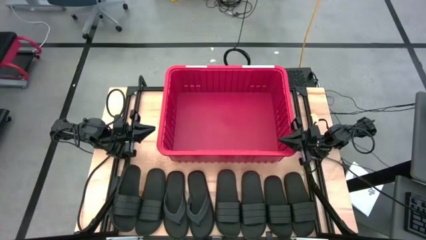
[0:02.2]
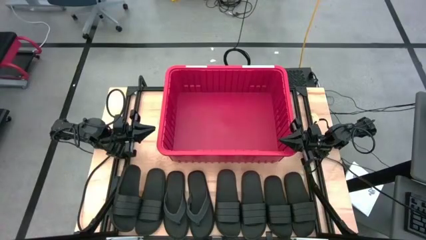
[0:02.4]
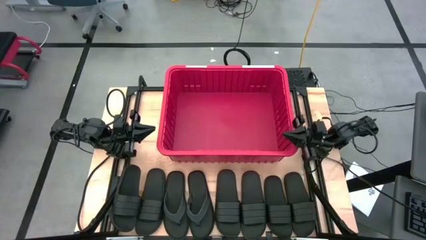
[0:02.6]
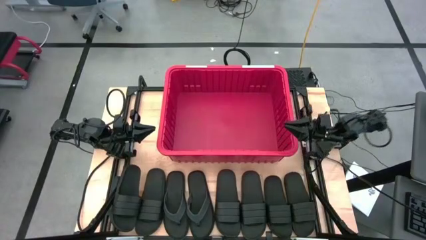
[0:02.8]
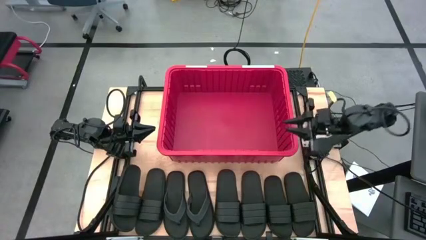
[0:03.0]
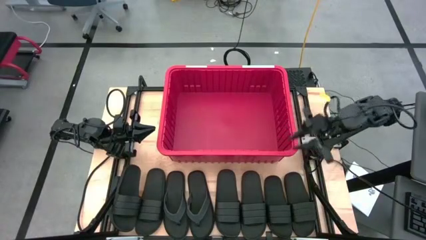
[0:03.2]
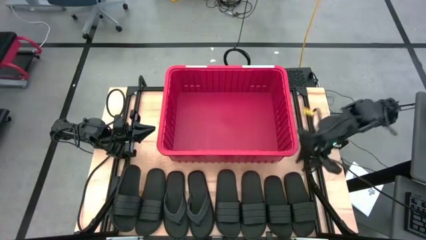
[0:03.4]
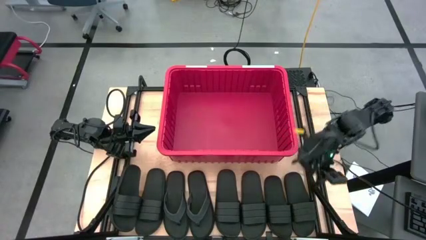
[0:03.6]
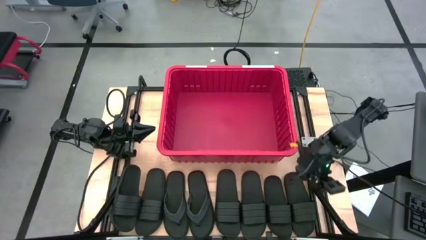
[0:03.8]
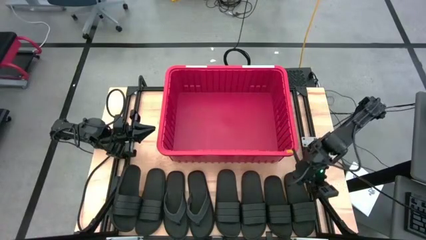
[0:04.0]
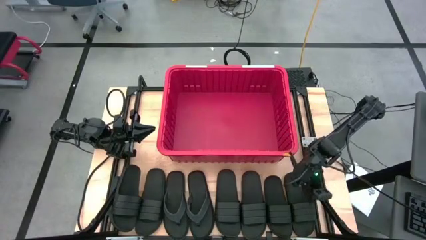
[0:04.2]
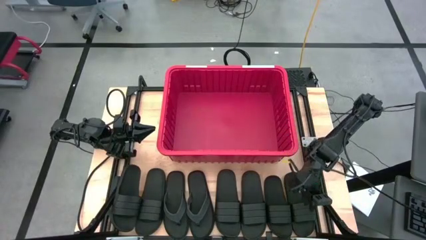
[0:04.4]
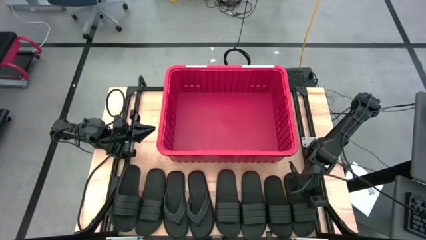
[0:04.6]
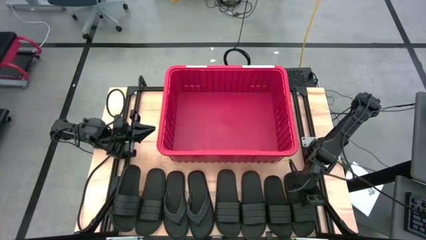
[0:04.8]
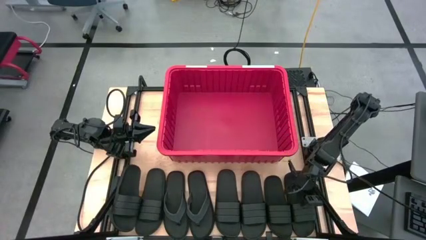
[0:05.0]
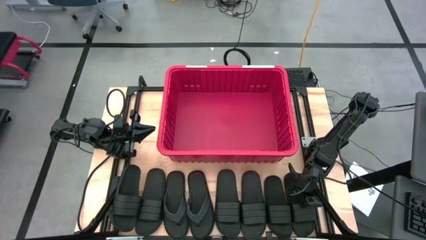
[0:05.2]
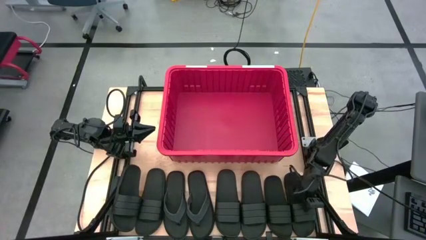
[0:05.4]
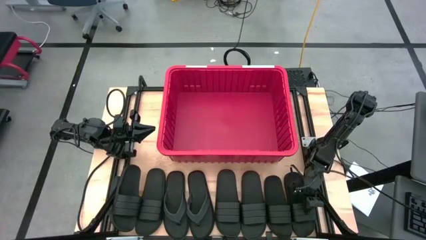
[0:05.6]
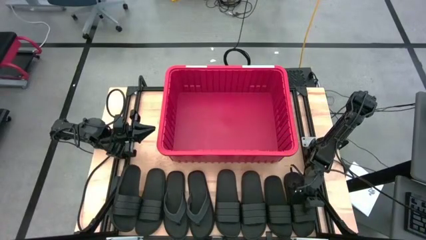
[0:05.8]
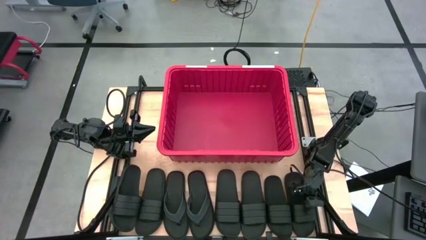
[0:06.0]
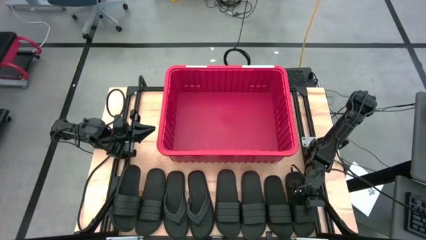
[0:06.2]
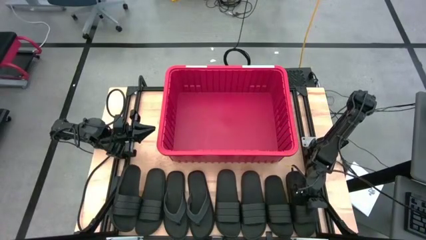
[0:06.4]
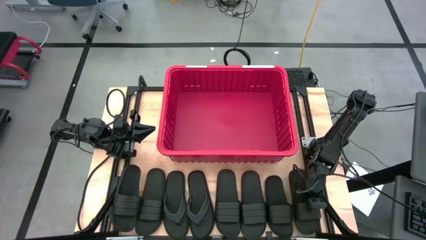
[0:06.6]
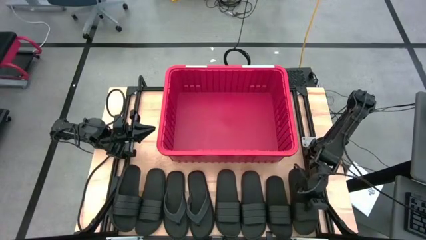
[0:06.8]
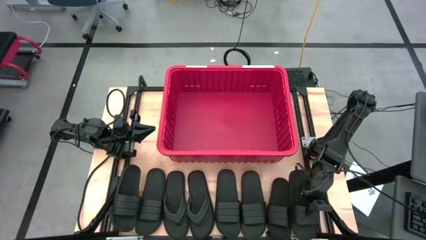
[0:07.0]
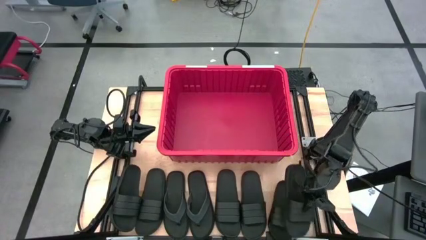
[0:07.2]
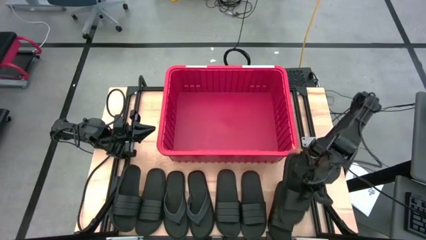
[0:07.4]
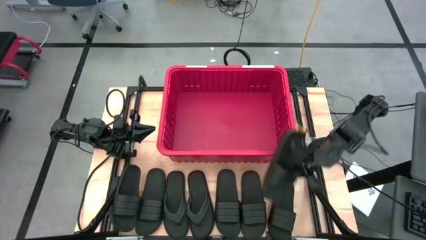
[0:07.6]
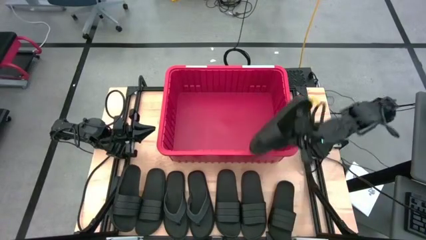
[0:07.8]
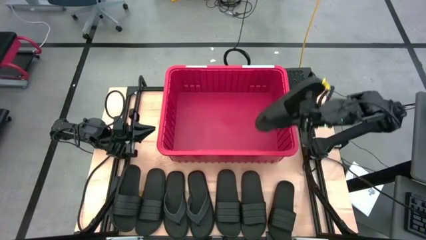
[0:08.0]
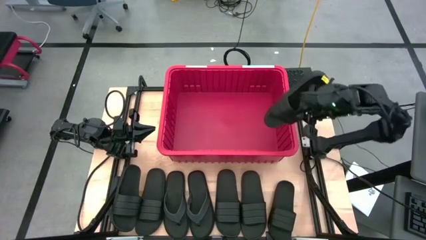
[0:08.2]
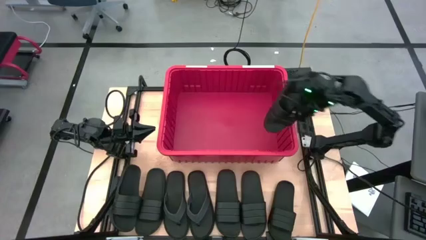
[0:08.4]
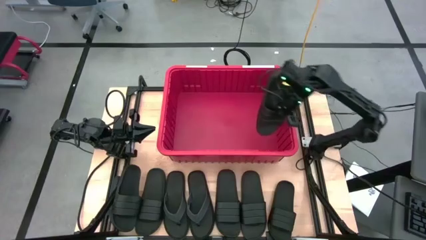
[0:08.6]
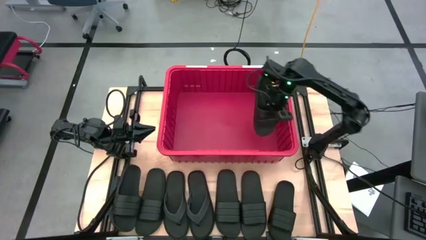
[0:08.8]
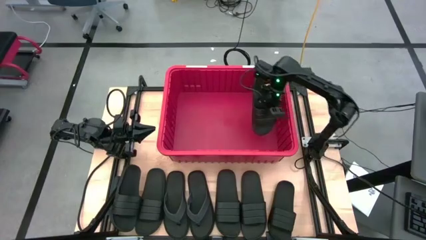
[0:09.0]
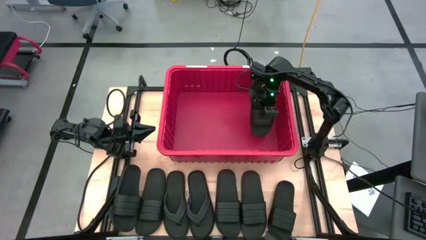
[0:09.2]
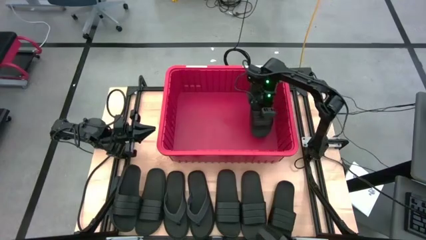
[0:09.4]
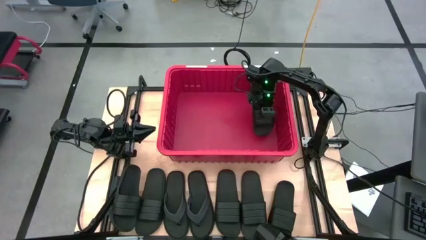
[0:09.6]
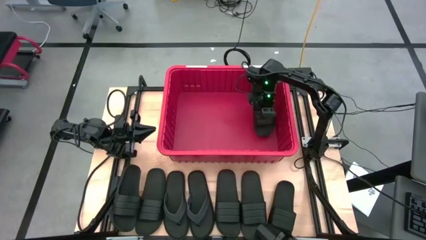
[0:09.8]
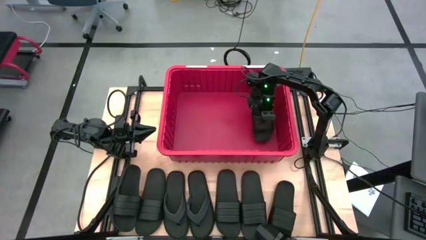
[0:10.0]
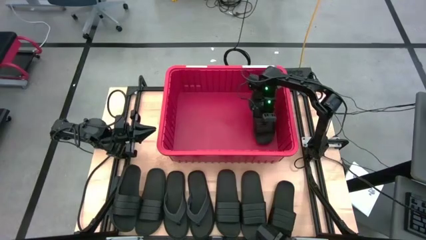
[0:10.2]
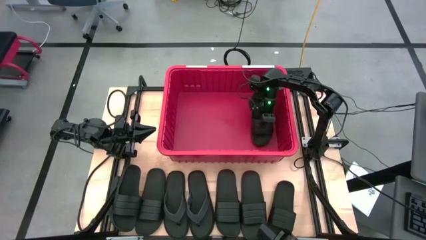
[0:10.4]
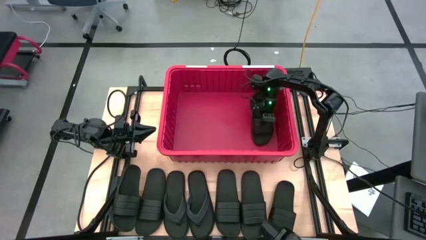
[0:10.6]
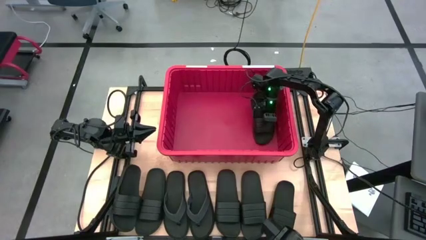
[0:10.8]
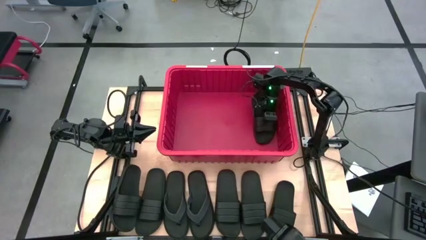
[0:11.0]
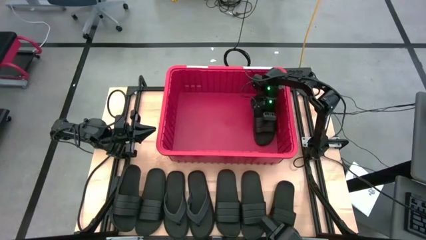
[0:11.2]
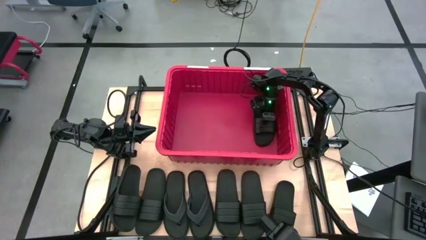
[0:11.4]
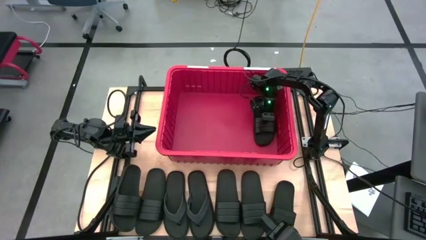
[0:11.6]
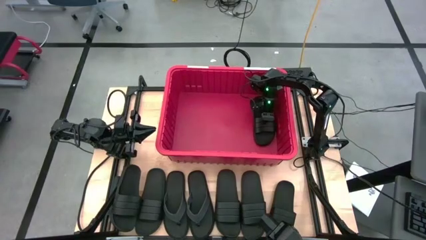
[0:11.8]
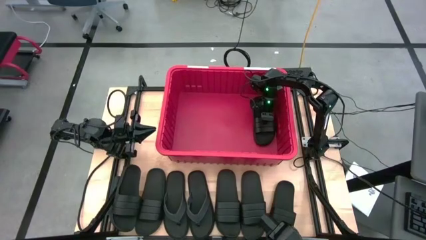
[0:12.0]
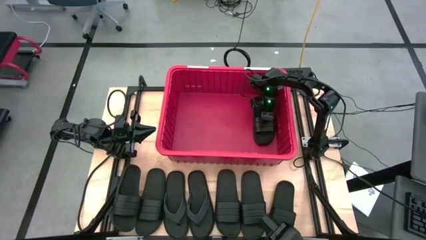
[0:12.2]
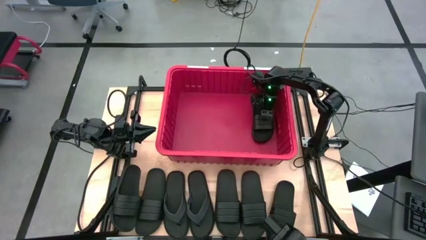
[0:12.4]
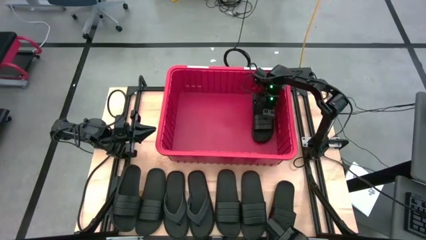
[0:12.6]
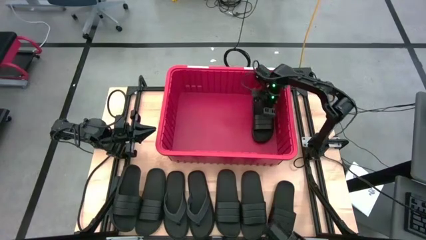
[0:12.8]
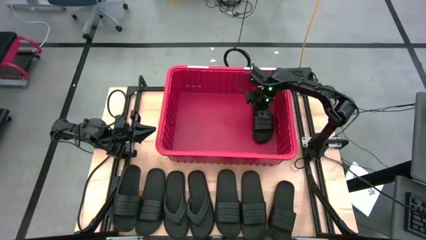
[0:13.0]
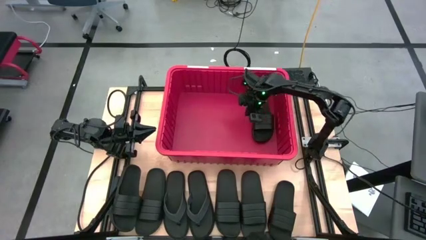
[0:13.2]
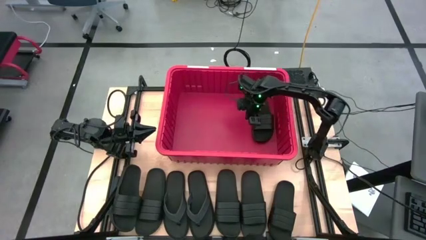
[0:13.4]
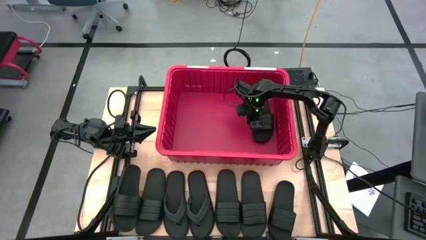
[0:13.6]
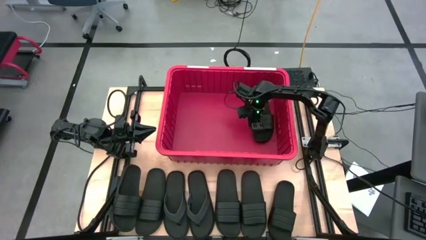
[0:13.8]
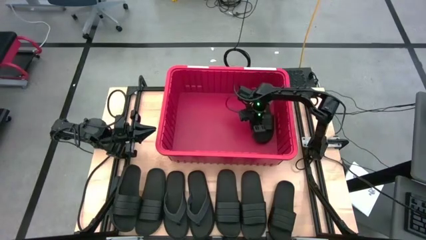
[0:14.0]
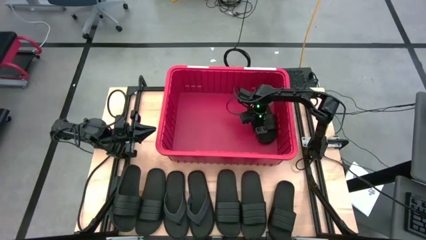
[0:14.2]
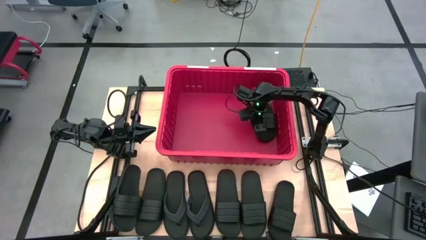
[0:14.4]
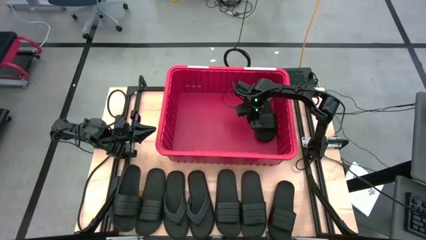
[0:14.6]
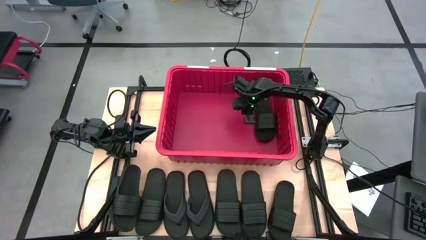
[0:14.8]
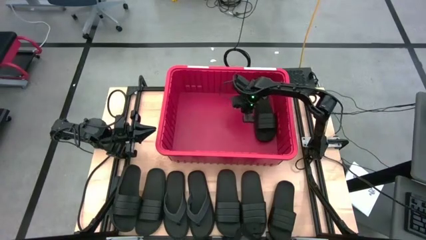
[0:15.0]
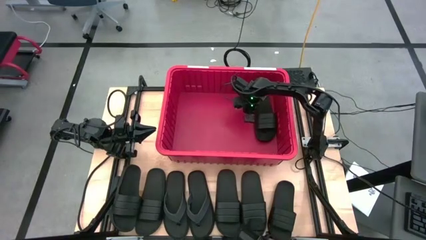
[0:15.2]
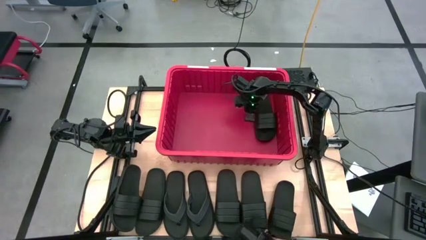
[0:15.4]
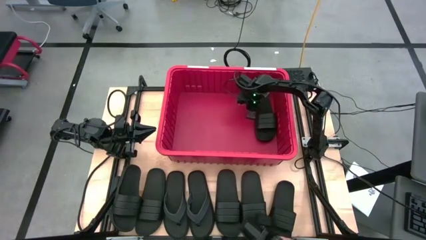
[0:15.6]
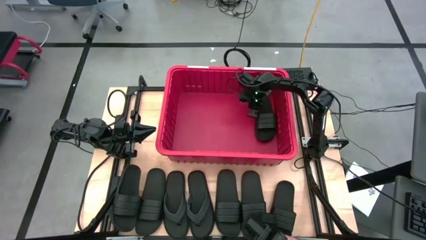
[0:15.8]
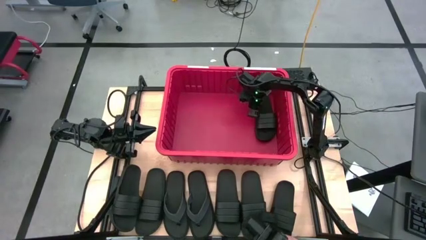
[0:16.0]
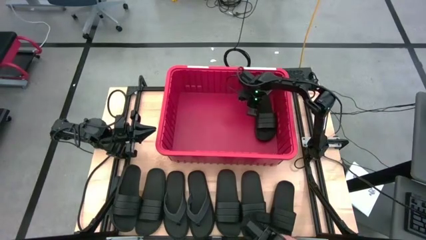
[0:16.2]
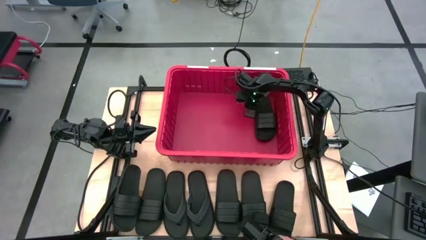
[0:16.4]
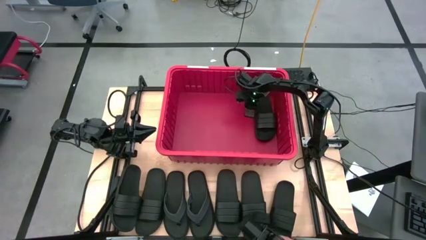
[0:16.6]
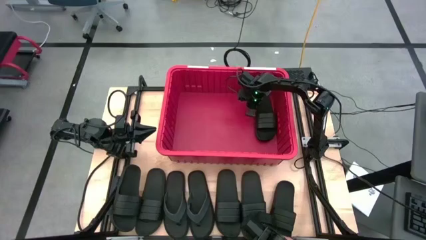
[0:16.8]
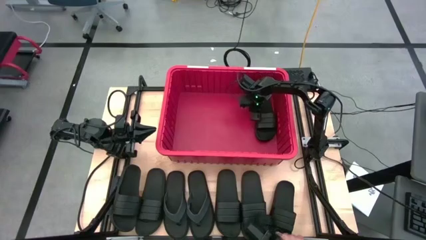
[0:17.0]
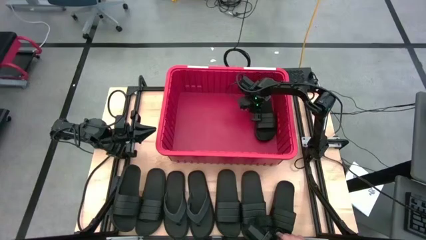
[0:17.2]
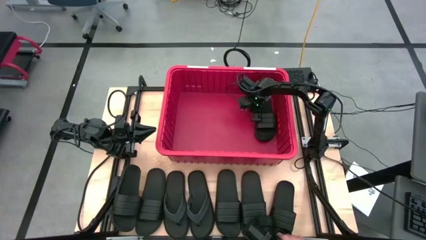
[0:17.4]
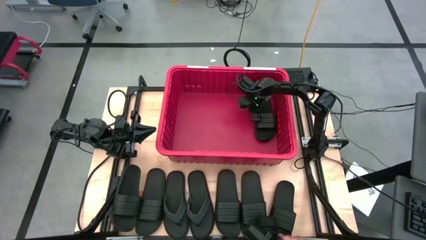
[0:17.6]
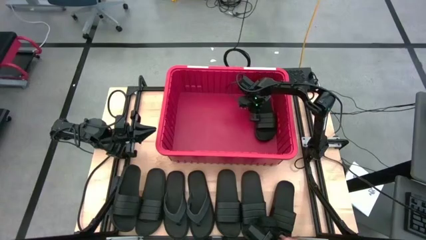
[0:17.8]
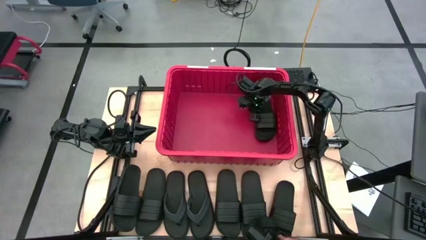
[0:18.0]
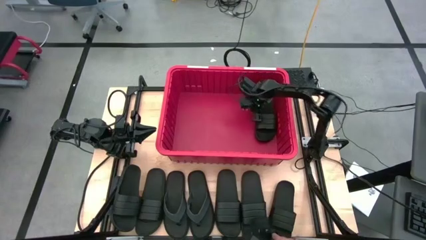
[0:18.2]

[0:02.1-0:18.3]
Task: Pick and place slides into bin
Put the black slipper into the red bin
